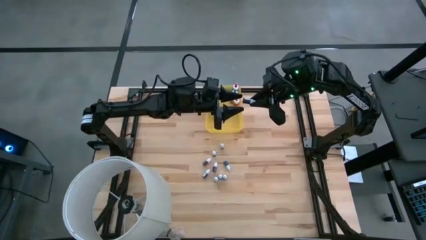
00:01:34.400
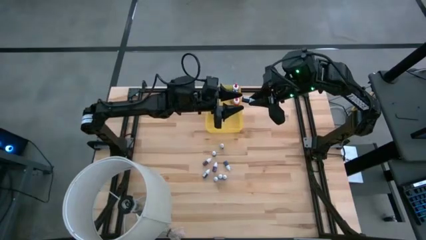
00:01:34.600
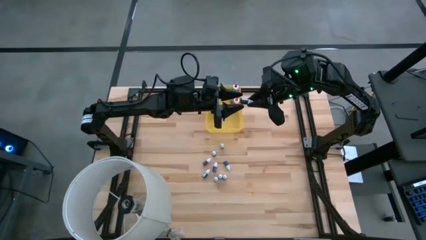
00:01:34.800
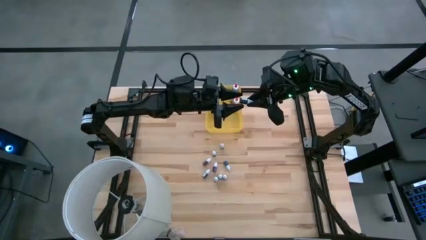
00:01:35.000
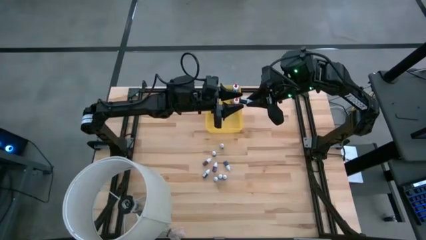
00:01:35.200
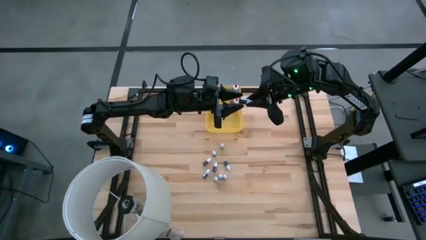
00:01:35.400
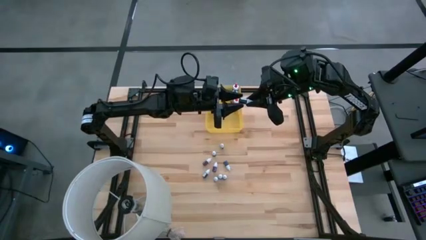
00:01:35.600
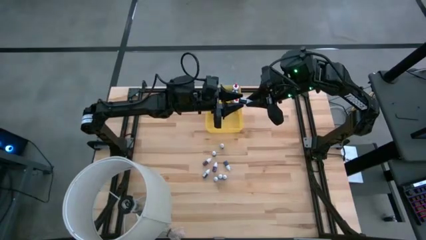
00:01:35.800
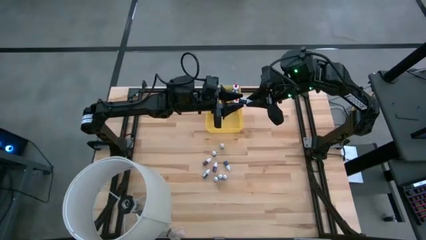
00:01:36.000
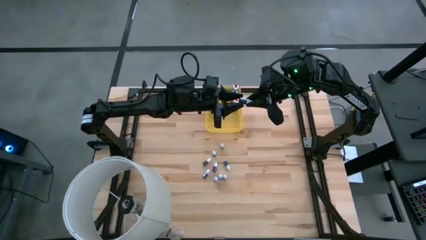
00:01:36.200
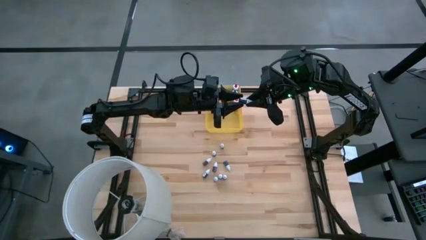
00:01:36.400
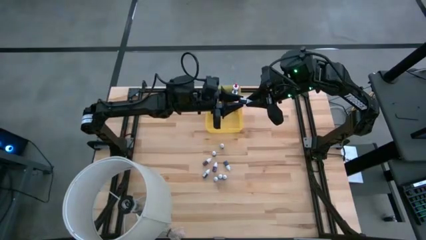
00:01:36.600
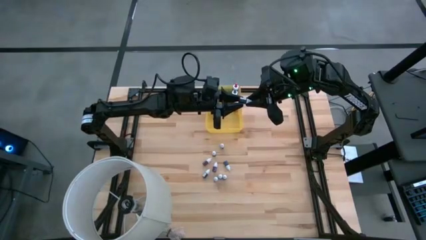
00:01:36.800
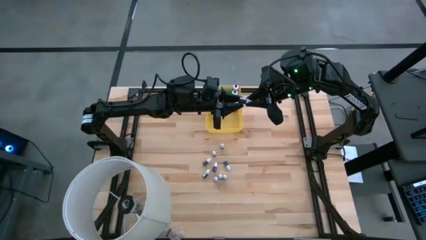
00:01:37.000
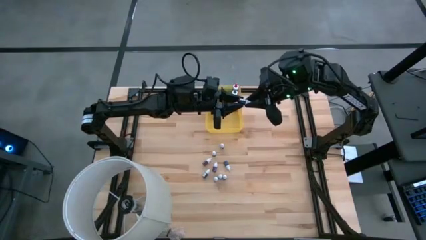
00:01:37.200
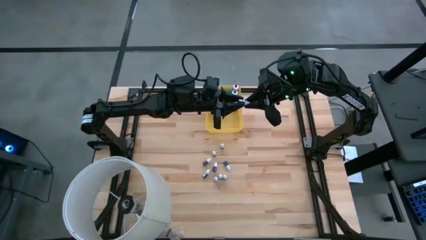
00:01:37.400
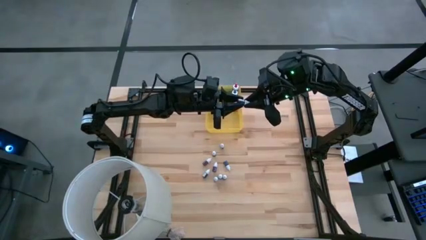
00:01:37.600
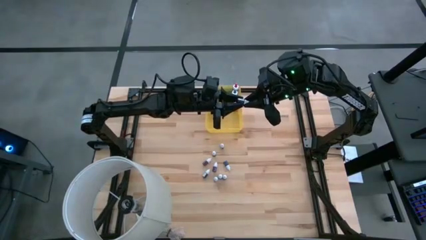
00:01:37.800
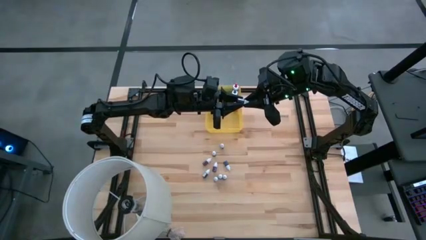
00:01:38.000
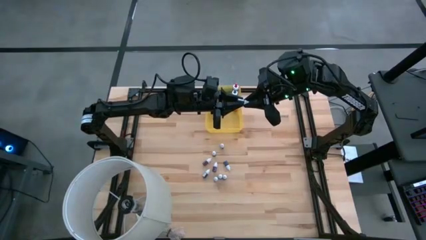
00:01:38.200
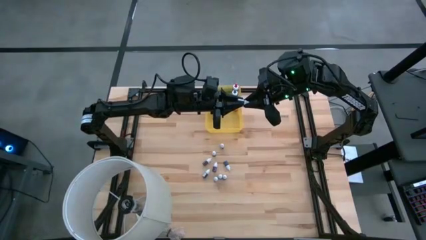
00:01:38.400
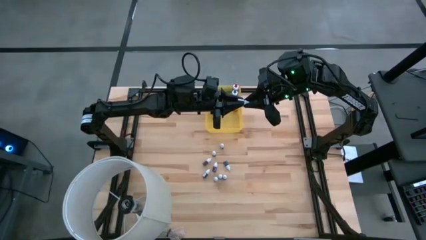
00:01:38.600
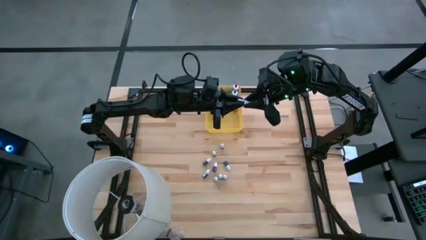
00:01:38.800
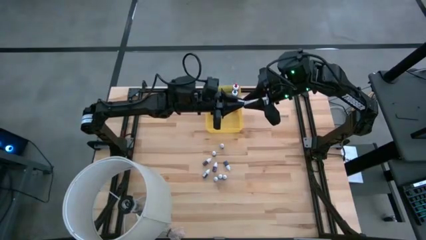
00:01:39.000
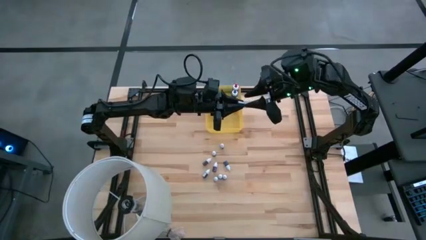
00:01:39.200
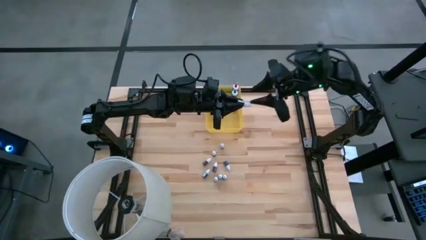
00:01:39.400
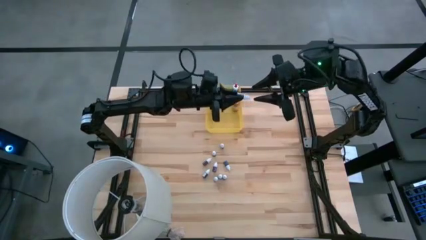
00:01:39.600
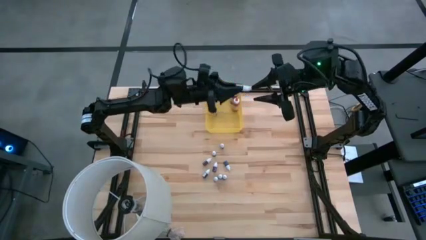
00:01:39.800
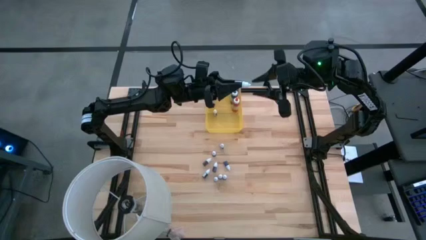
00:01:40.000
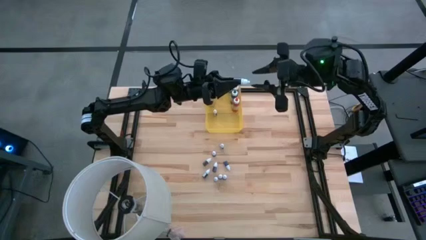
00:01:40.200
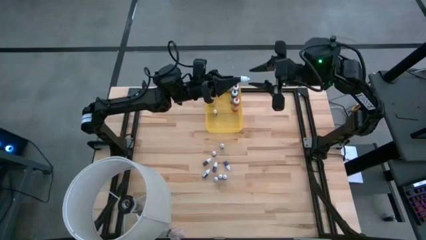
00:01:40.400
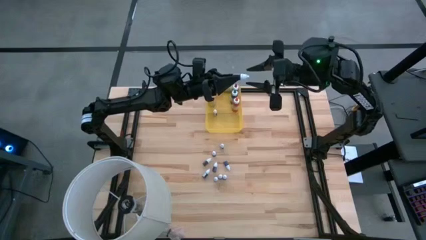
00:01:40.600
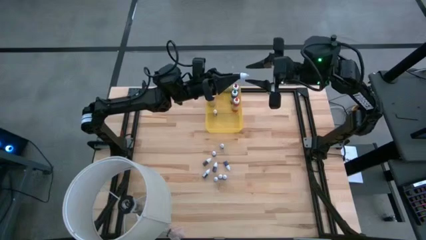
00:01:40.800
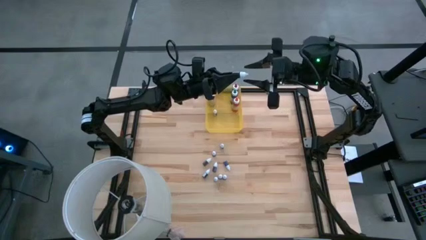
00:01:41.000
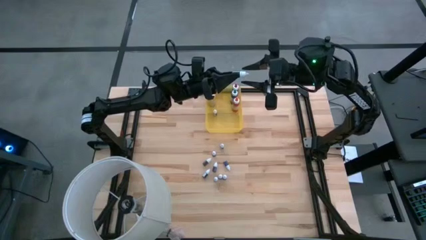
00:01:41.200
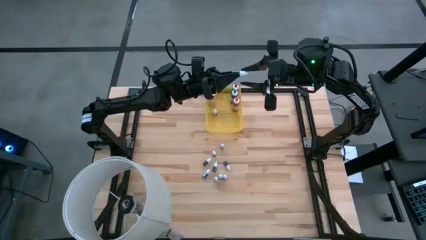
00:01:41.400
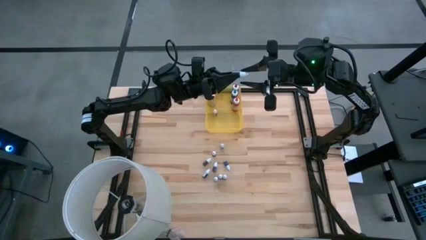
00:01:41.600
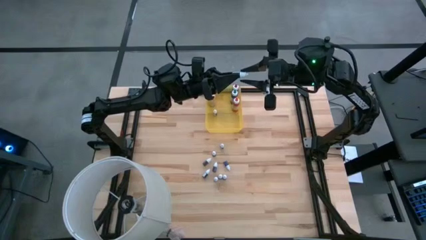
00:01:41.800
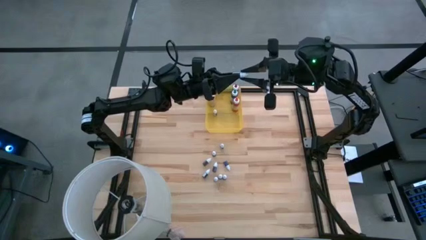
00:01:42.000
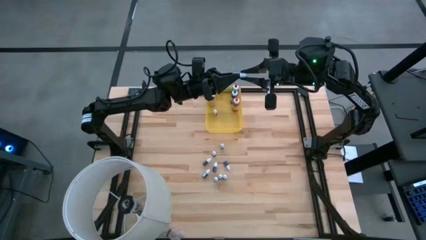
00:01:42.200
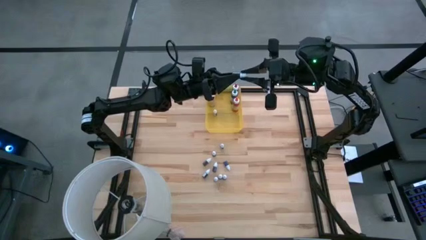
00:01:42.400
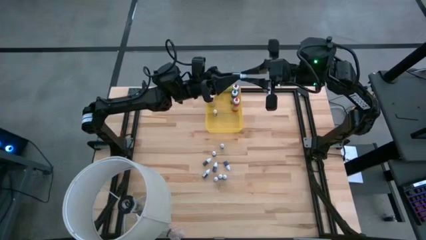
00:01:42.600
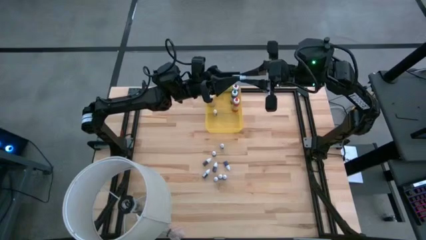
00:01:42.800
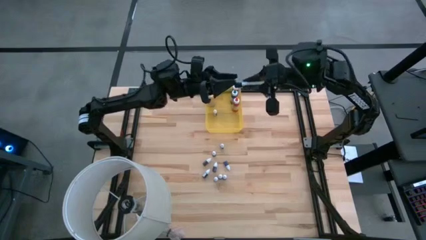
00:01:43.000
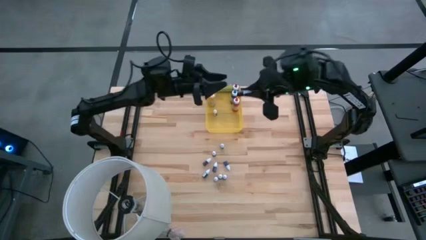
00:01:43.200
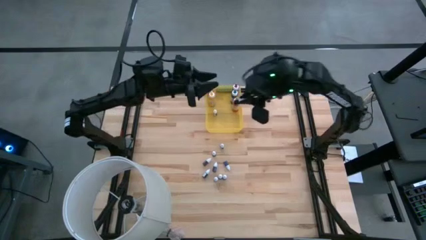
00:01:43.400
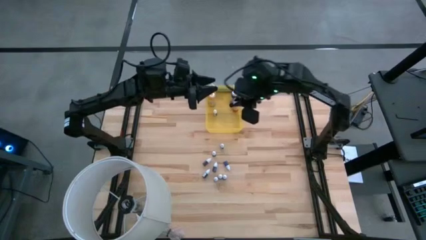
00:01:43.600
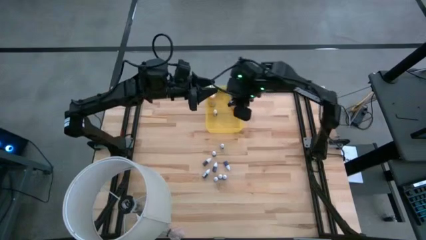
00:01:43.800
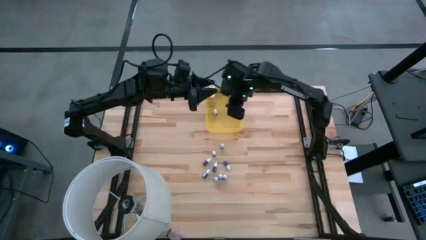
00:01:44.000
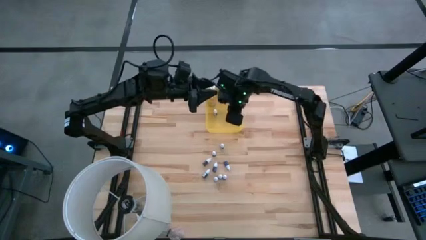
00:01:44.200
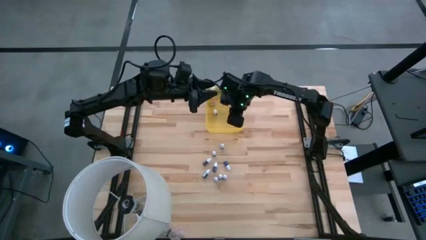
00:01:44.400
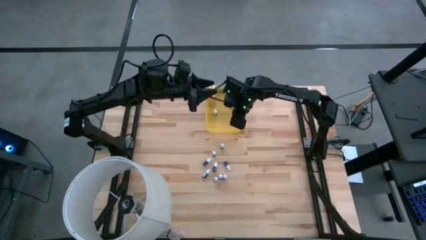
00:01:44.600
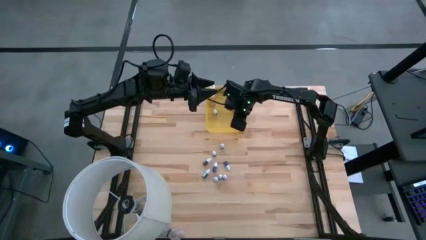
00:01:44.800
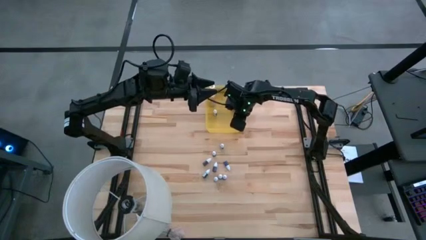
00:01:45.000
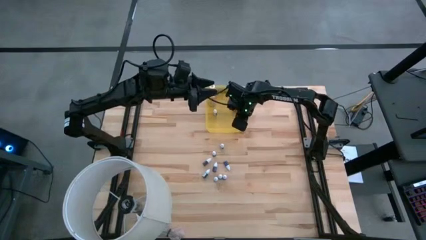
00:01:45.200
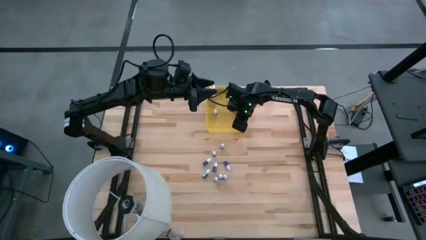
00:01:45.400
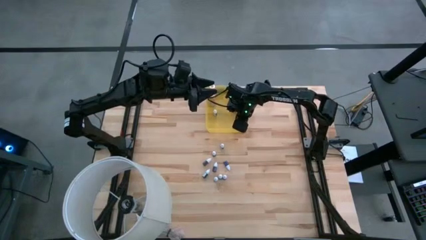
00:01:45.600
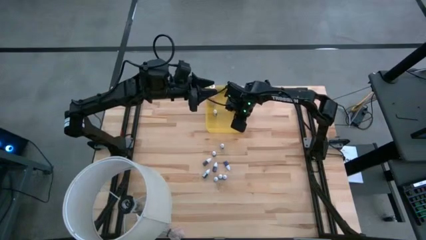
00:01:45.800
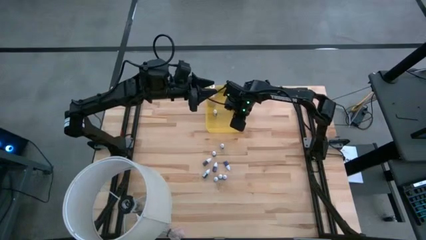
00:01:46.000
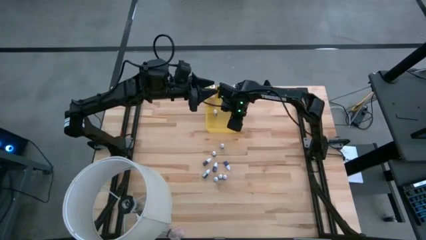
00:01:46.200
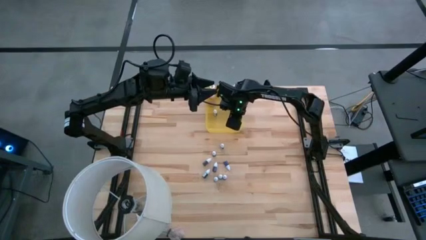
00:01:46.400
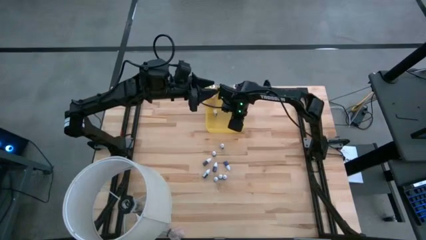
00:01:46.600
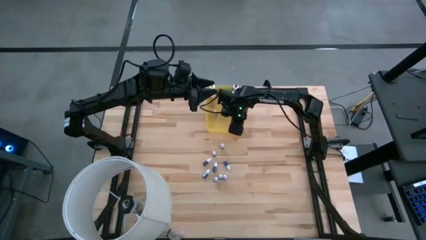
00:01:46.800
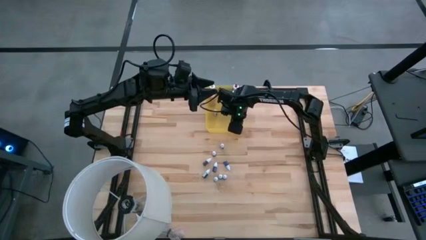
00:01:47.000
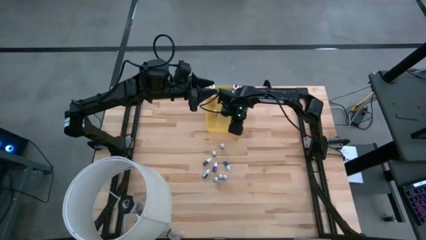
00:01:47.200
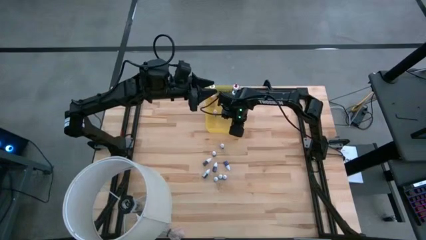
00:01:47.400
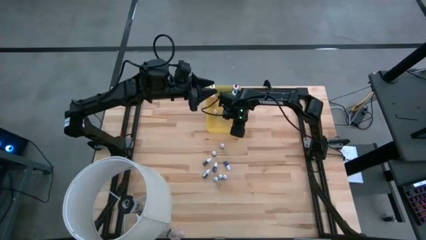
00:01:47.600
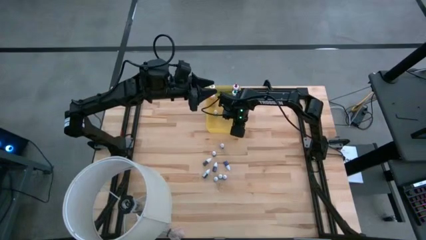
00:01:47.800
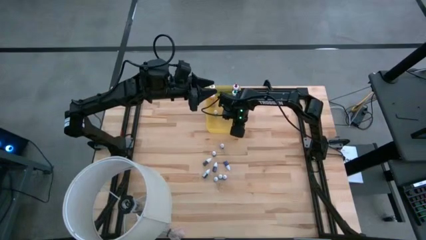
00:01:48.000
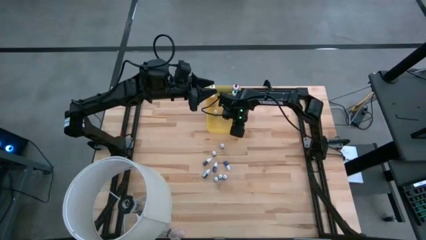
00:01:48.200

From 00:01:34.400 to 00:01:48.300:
Task: Pick & Place food coloring
Put the top small black food coloring bottle into the yellow bin
